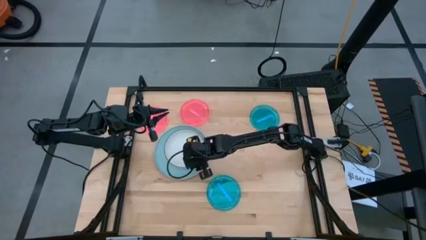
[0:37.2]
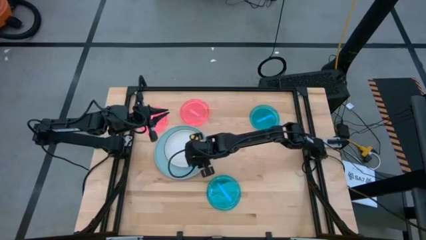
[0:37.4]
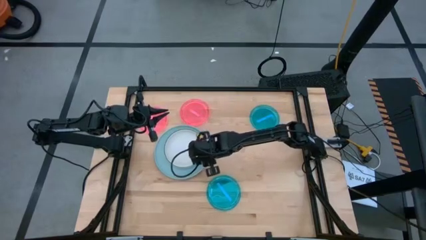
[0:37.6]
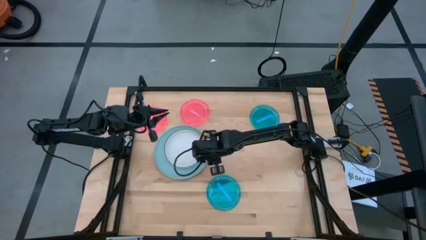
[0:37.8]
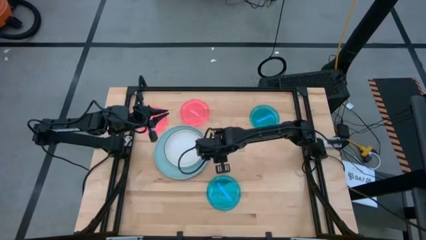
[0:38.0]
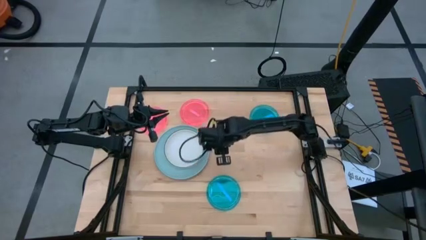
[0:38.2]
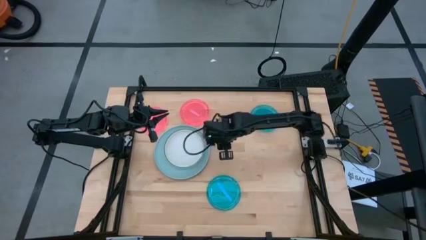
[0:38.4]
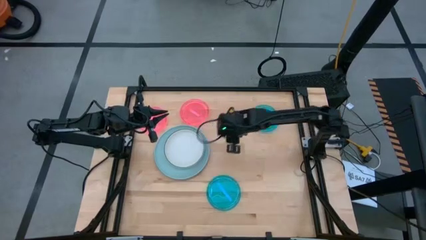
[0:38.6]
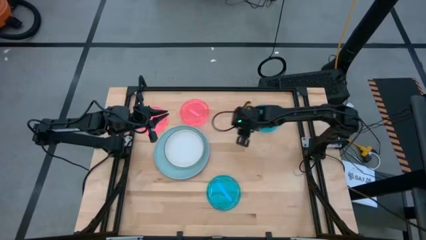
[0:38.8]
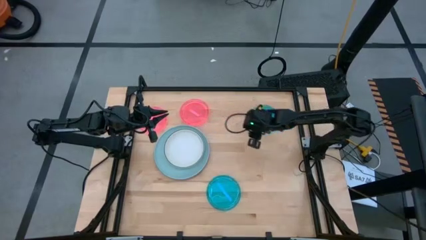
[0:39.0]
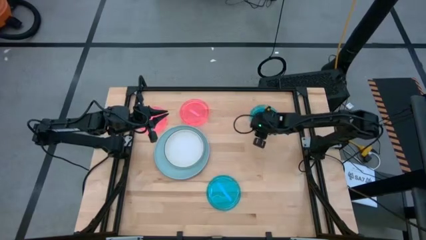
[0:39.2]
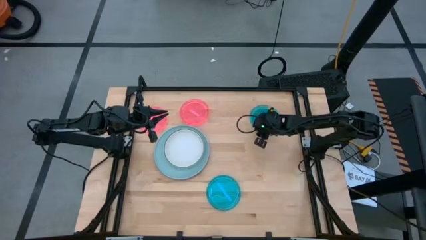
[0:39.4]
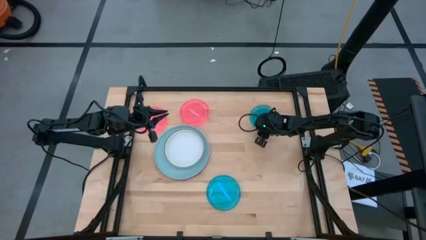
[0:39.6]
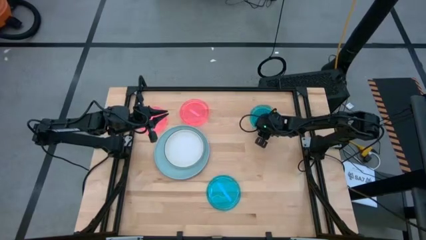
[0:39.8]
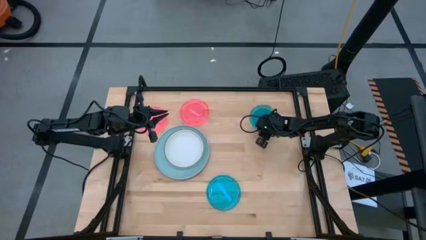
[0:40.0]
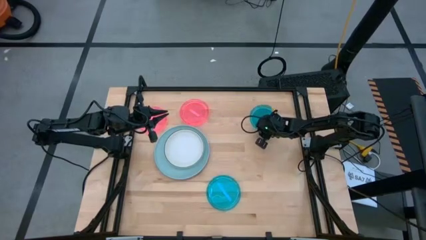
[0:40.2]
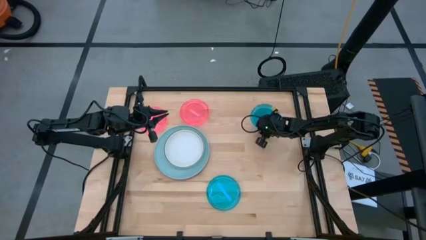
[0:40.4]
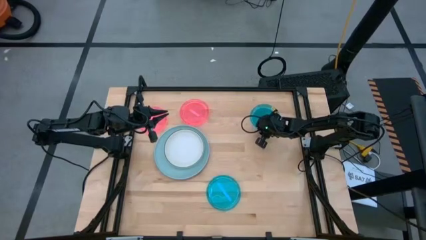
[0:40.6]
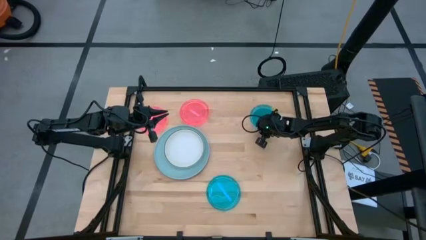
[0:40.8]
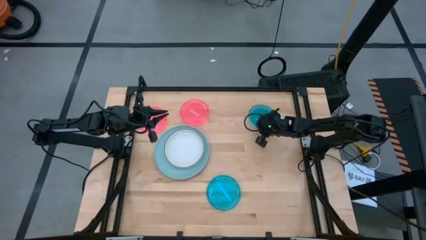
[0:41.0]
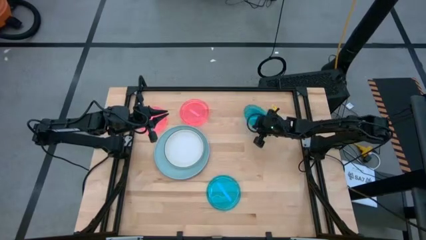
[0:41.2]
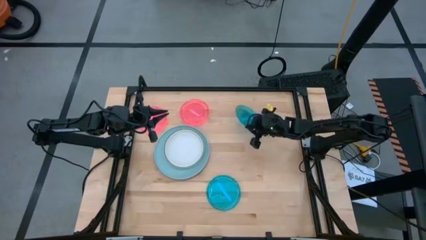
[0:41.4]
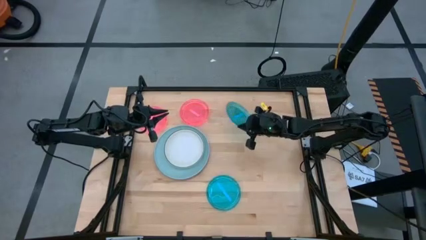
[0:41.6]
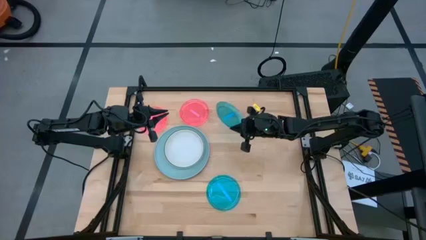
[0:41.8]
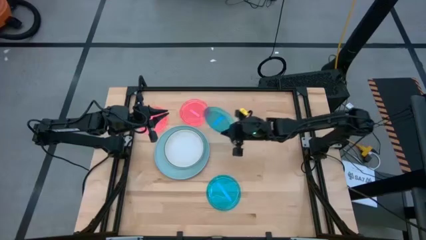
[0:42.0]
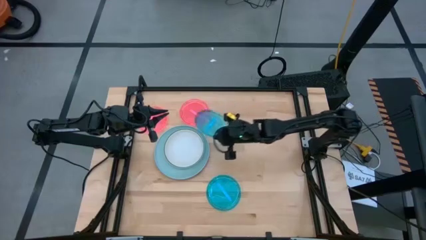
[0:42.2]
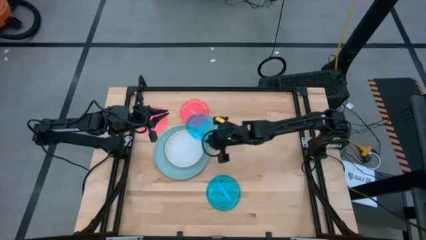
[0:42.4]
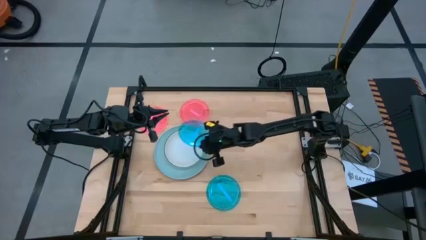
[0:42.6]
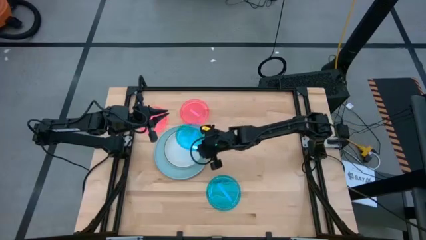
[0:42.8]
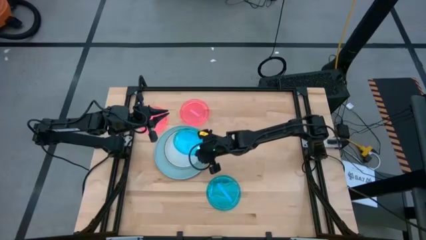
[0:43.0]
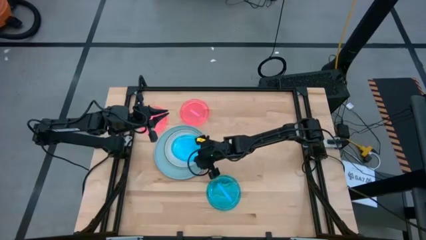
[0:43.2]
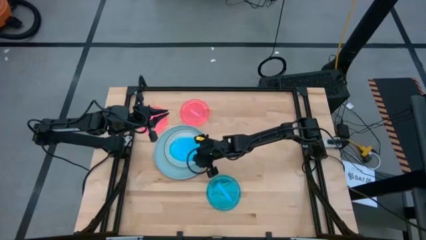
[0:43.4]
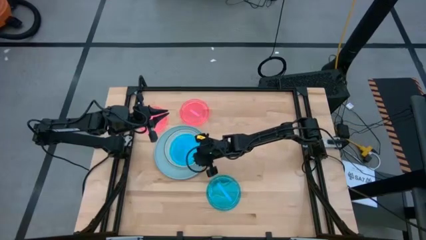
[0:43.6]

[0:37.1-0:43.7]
Task: Stack plastic plates
Stack the top light blue plate on top of the white plate

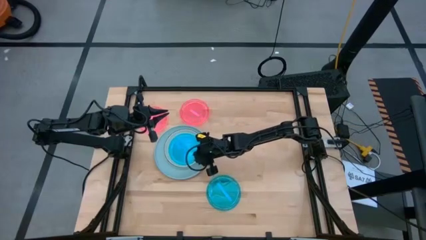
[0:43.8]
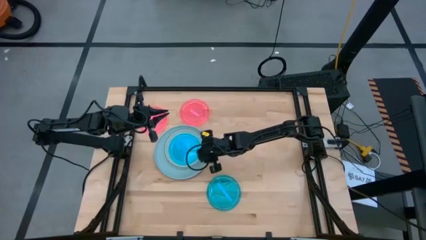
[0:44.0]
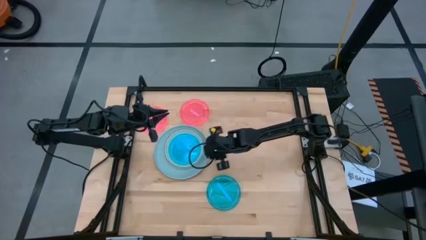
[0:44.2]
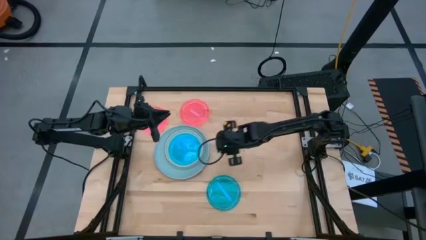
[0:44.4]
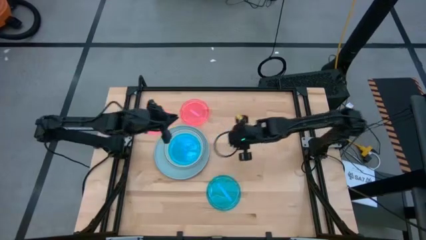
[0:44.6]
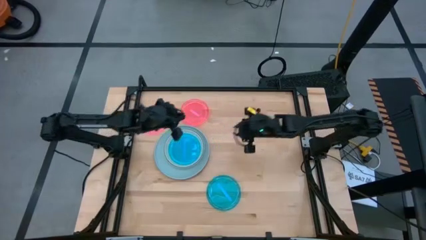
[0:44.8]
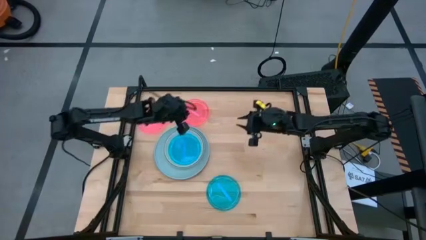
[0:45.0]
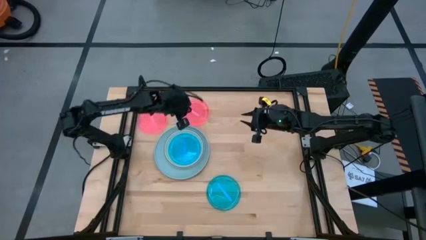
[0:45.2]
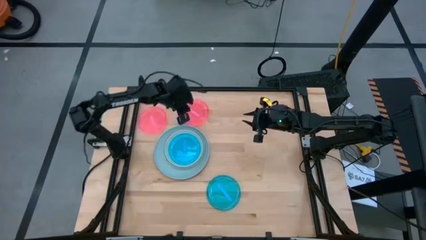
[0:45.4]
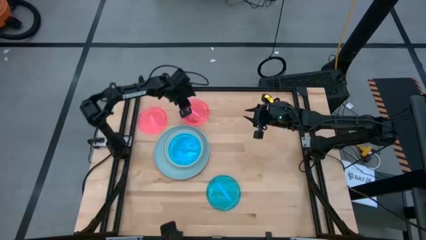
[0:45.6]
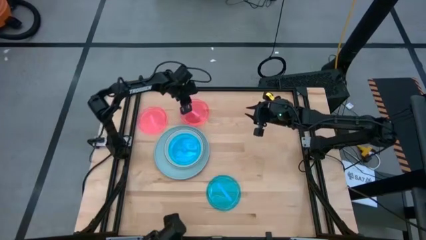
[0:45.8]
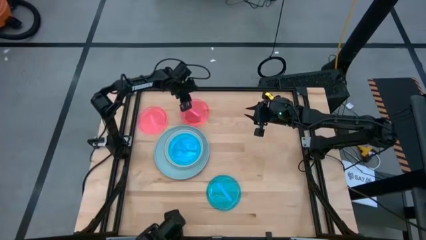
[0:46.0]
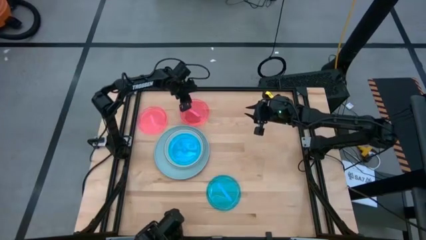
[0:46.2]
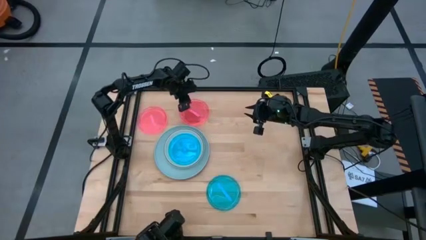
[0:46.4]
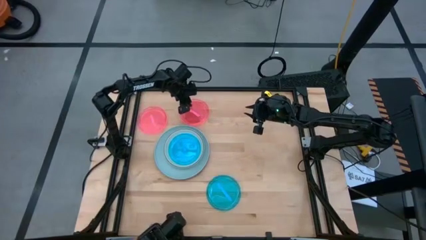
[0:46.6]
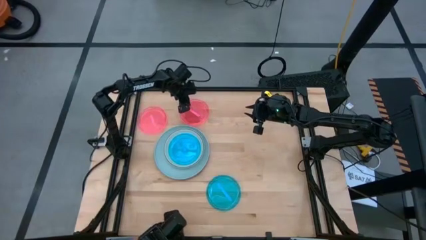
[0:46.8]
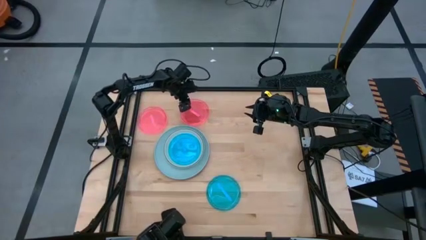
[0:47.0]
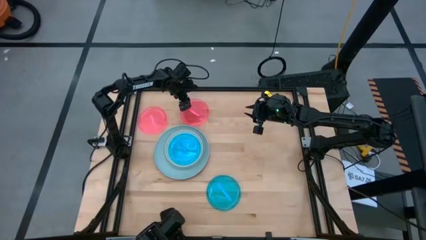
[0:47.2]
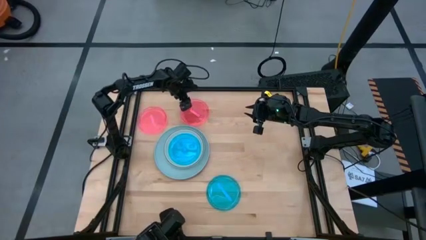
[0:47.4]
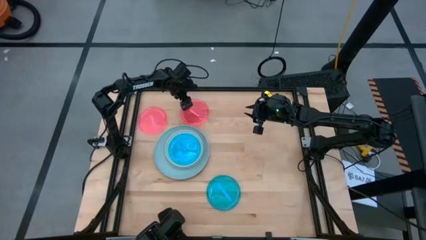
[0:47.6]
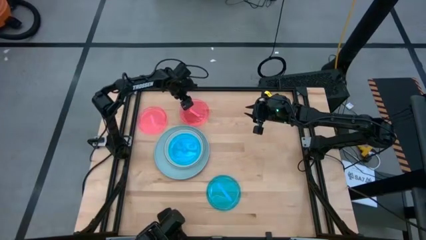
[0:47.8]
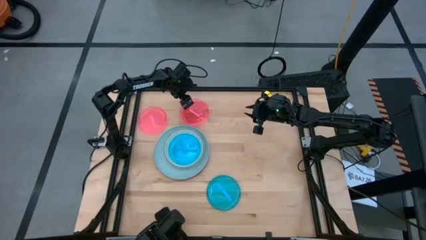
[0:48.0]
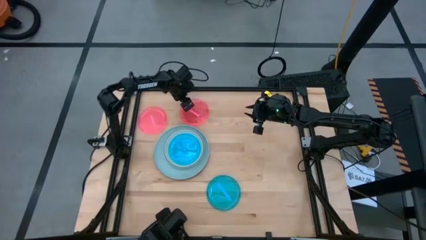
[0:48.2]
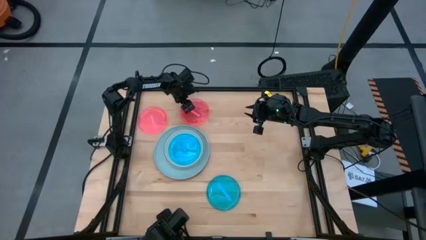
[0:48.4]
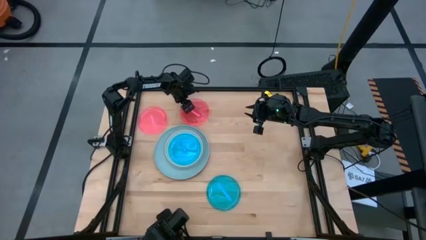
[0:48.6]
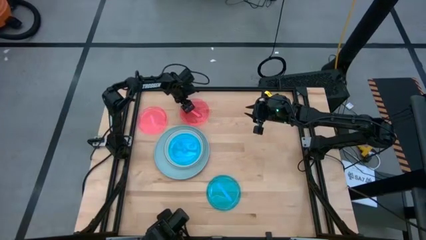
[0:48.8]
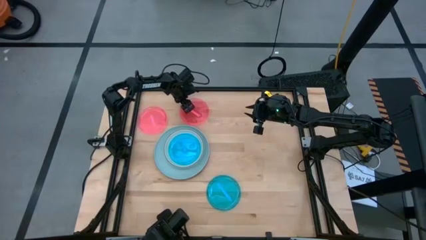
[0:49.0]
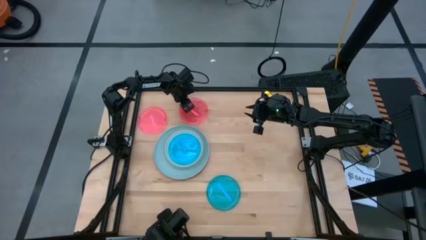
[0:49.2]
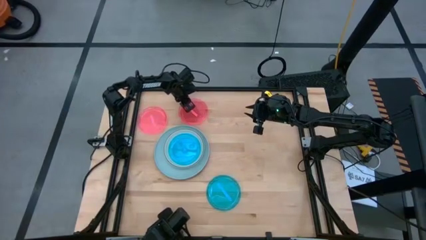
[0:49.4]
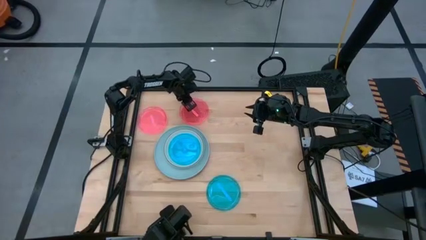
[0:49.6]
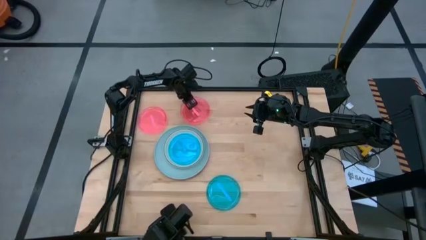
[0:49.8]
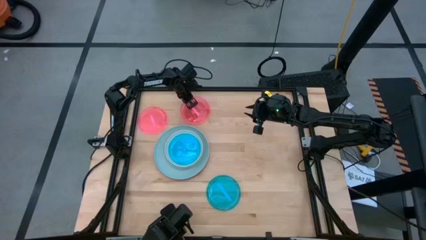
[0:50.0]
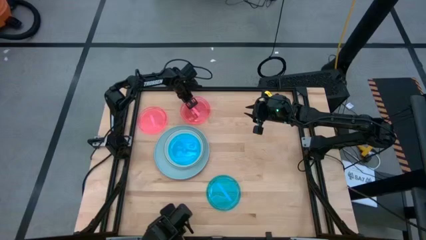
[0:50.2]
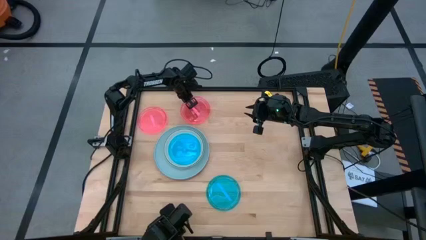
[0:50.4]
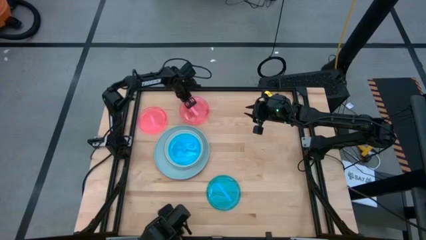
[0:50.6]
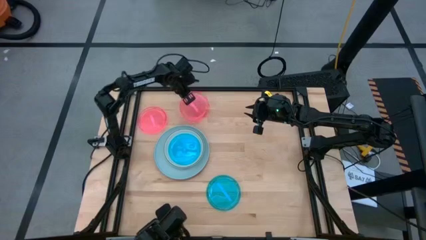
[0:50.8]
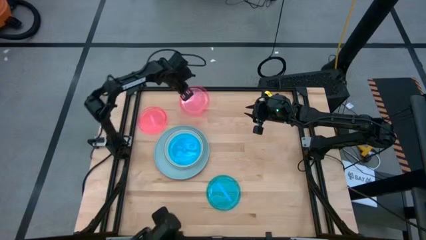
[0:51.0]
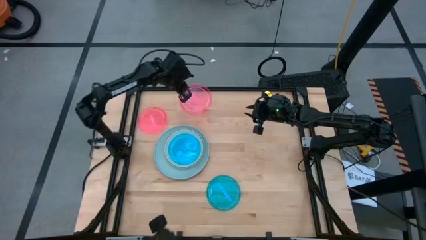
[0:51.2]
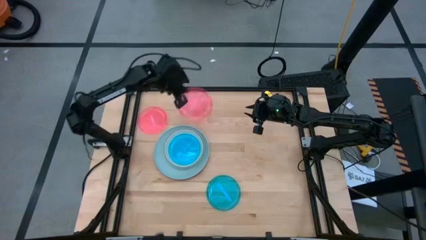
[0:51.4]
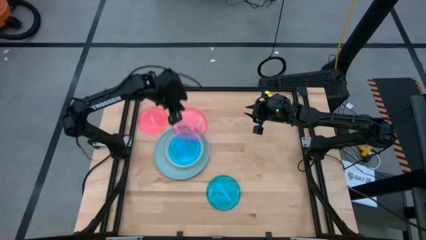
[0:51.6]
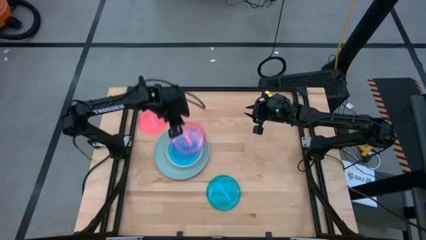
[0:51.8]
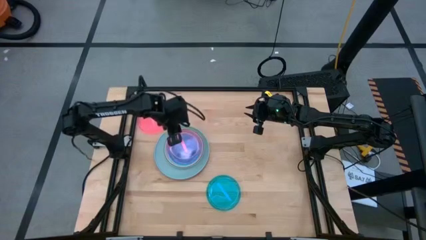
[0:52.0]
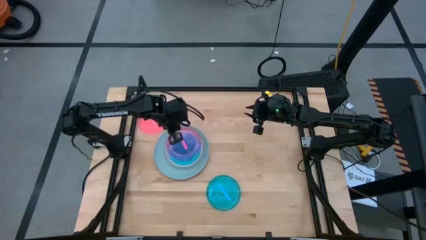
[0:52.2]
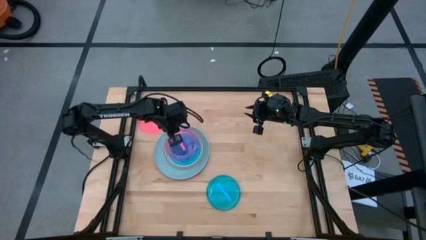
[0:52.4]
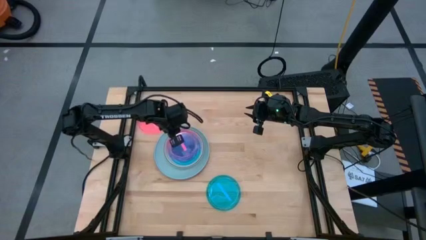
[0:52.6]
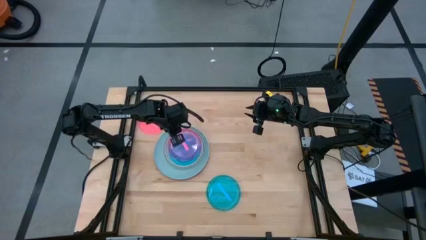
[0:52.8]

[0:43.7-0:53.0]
Stack the right pink plate on top of the light blue plate
